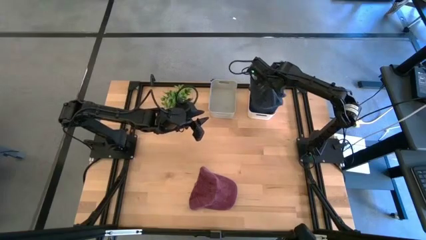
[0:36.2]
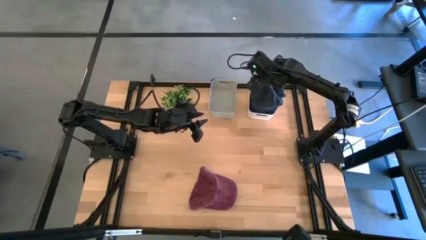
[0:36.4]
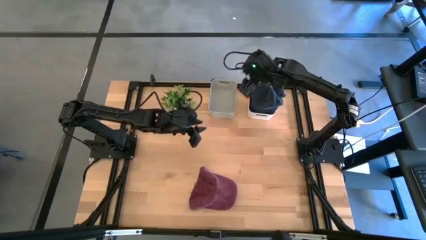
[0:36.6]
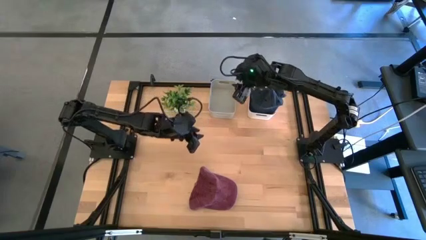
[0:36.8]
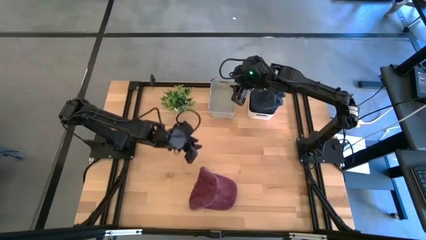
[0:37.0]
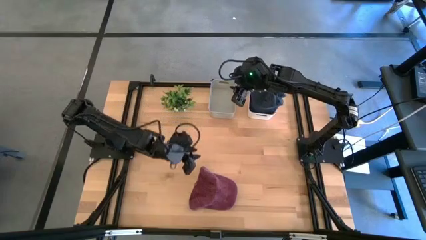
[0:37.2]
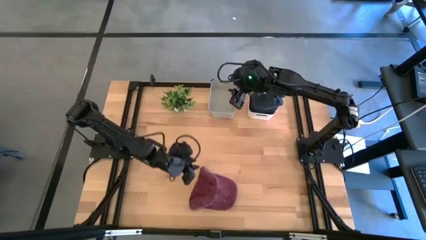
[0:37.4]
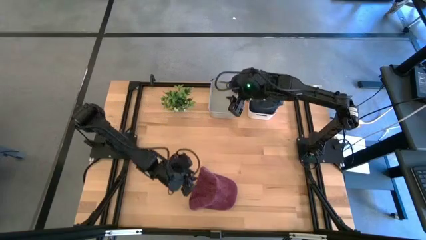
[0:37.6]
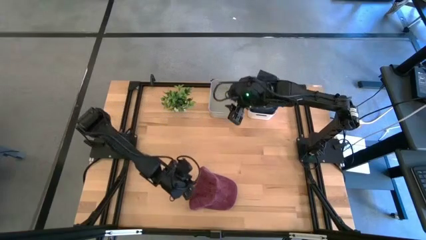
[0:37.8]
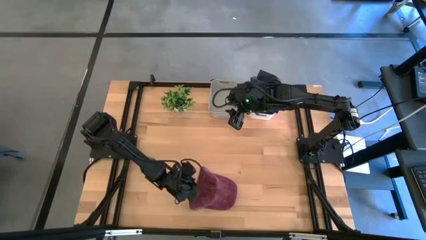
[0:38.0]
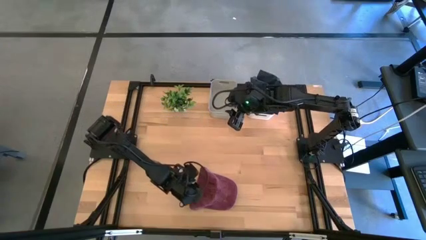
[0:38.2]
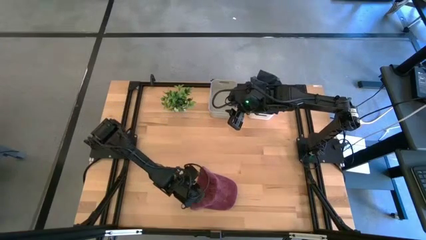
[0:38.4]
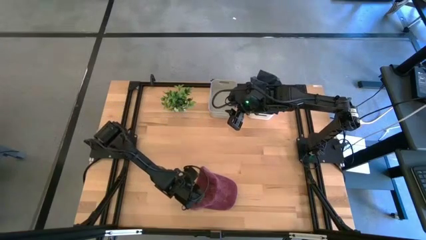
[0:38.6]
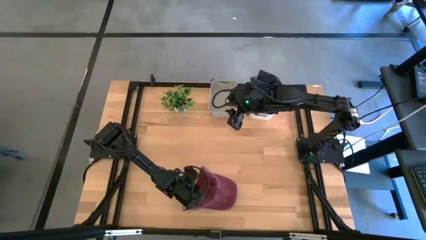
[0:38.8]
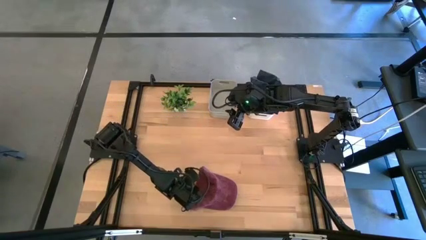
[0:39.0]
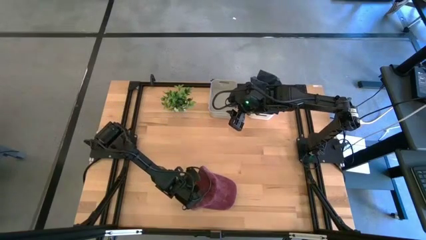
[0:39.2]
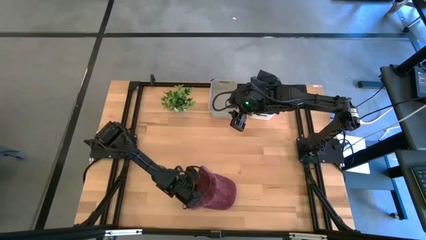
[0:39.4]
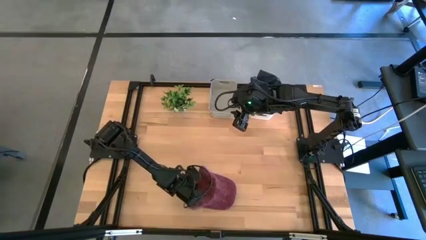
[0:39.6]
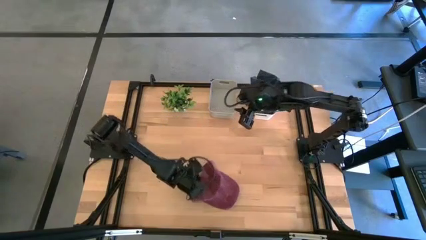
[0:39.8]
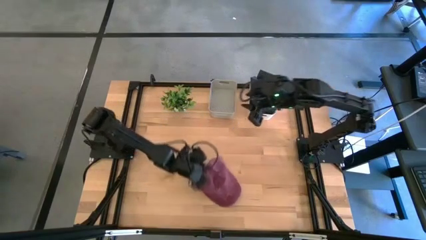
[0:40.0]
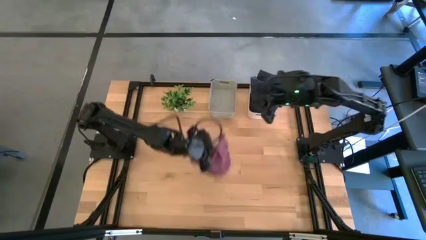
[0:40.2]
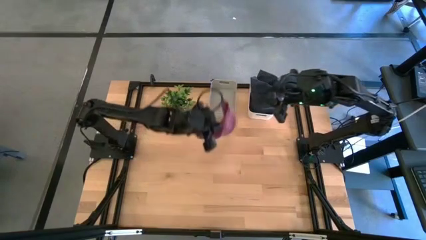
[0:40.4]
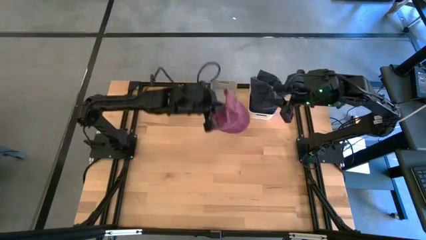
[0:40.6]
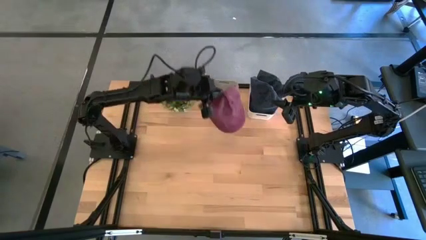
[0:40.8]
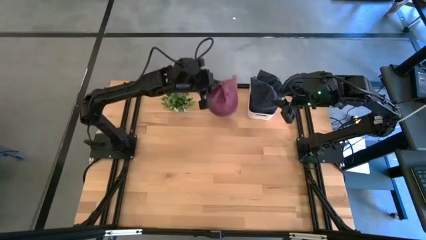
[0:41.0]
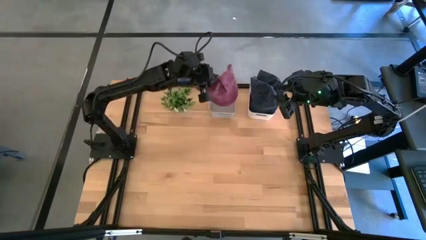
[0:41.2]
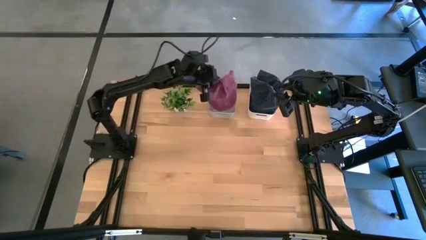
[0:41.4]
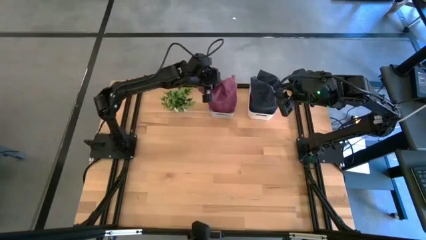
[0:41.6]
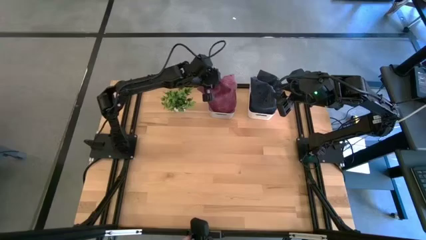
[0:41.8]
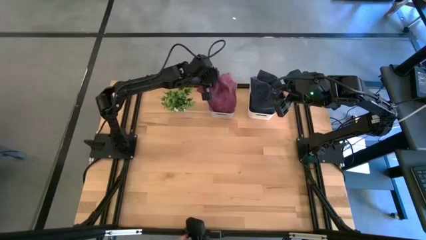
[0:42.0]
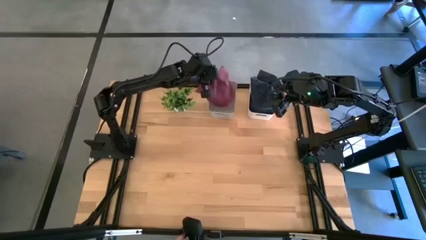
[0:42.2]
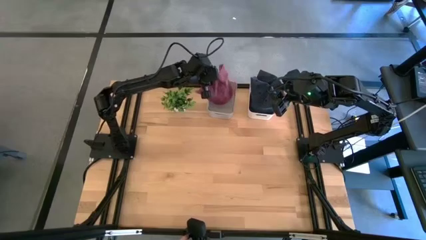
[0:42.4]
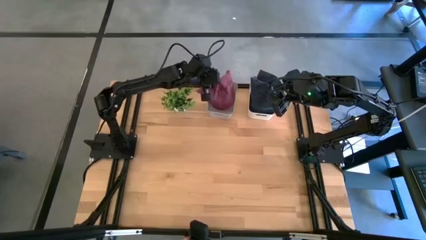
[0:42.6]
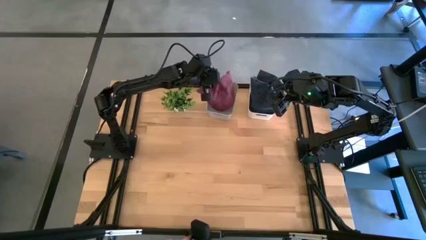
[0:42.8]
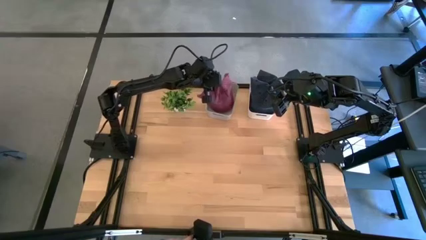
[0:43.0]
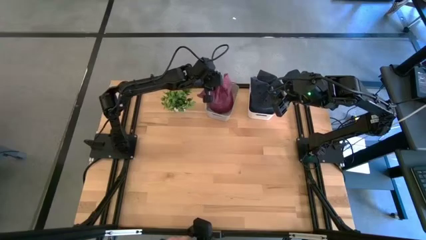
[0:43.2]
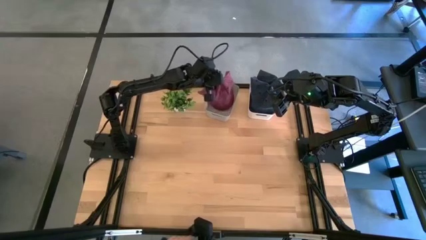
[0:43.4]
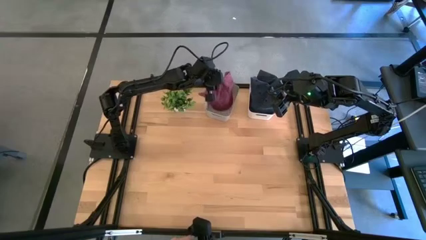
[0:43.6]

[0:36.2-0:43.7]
Task: Pick & Place hat
Put the red cap into the gray bin

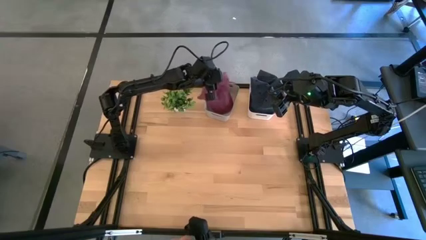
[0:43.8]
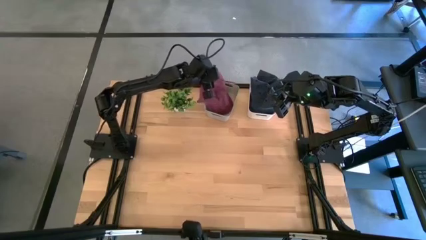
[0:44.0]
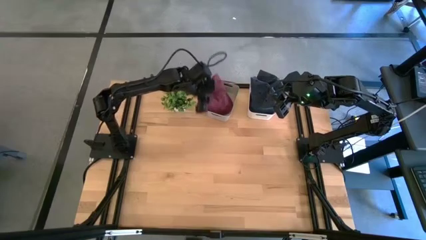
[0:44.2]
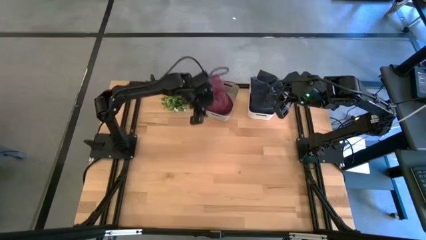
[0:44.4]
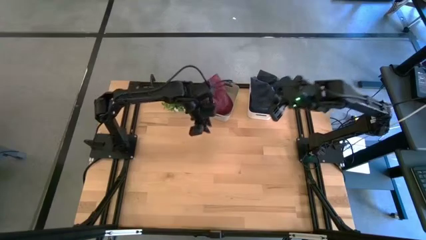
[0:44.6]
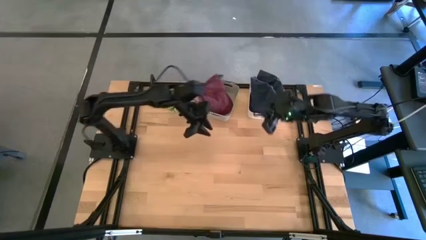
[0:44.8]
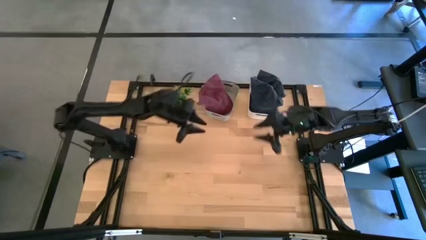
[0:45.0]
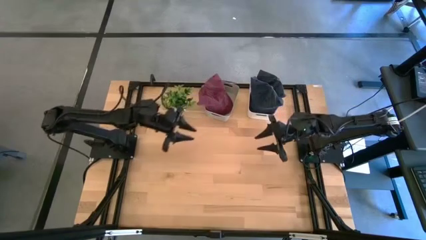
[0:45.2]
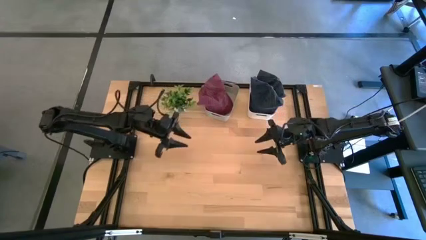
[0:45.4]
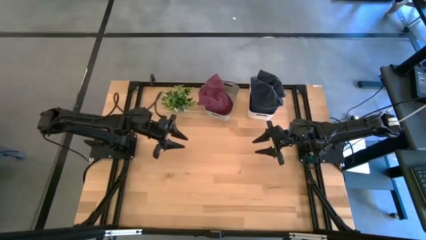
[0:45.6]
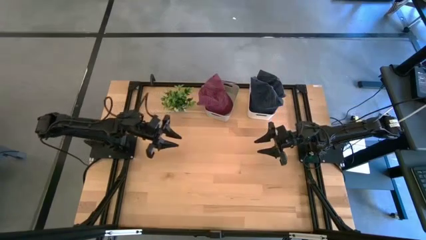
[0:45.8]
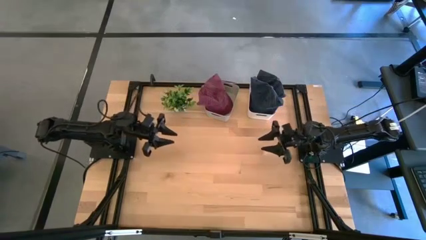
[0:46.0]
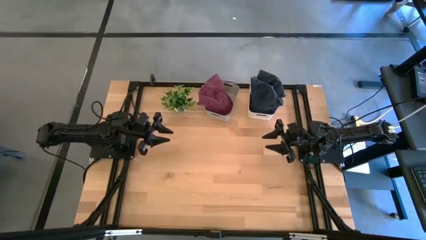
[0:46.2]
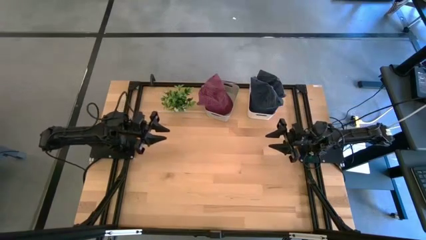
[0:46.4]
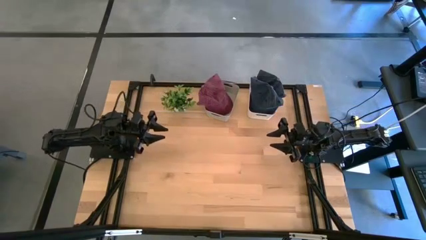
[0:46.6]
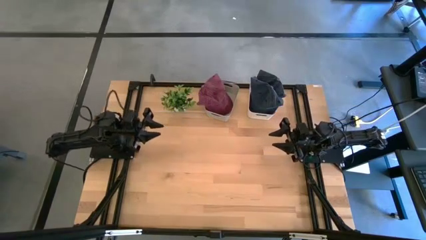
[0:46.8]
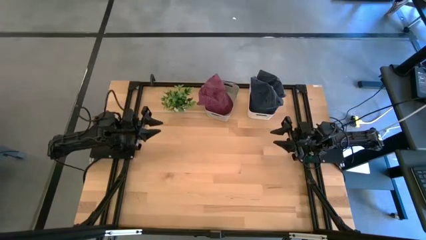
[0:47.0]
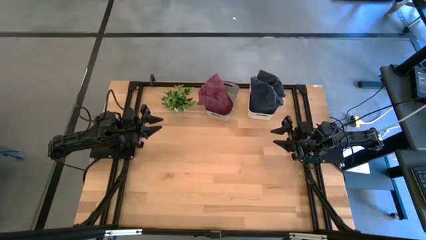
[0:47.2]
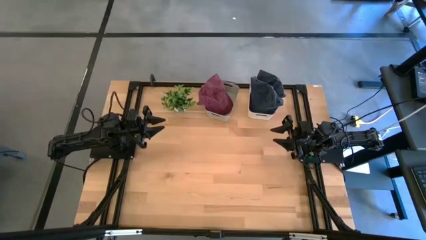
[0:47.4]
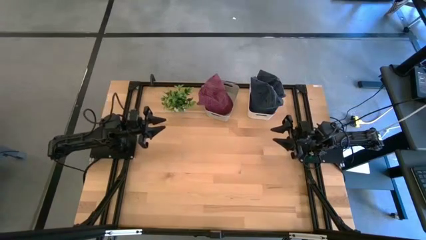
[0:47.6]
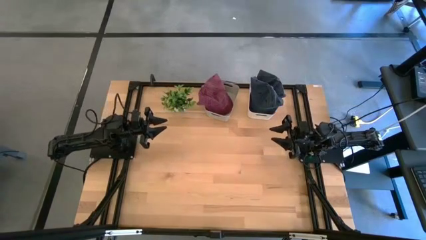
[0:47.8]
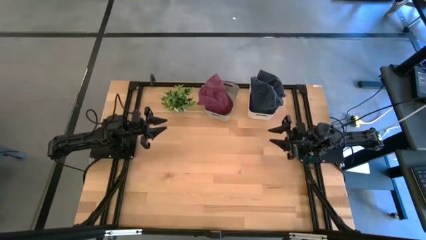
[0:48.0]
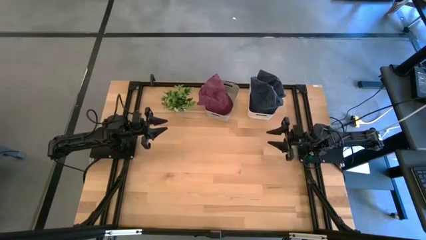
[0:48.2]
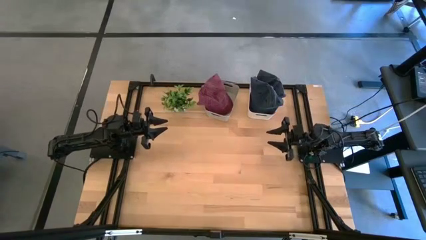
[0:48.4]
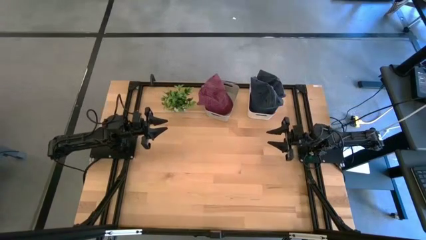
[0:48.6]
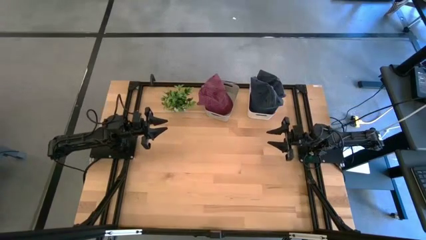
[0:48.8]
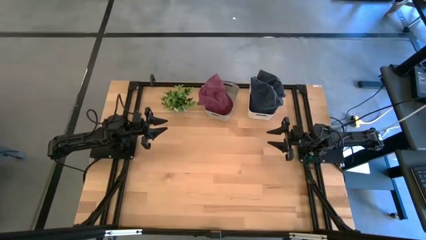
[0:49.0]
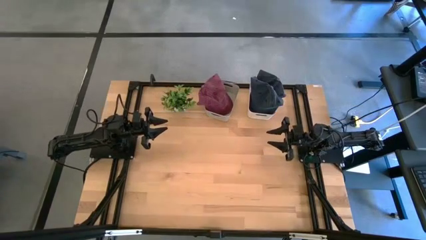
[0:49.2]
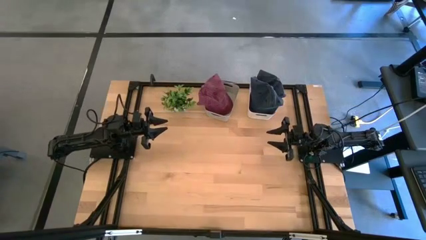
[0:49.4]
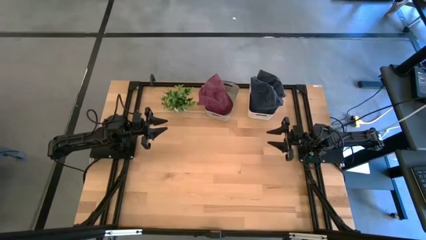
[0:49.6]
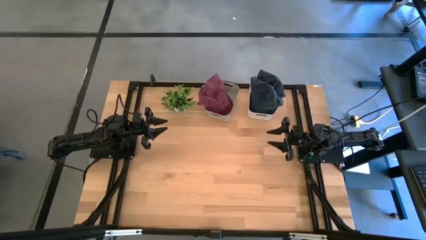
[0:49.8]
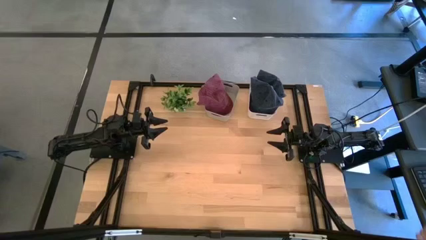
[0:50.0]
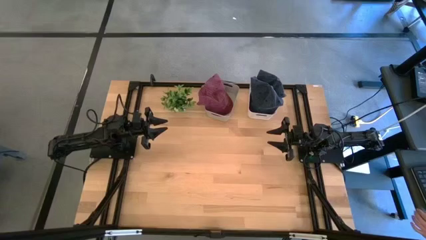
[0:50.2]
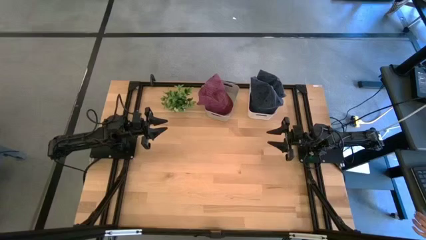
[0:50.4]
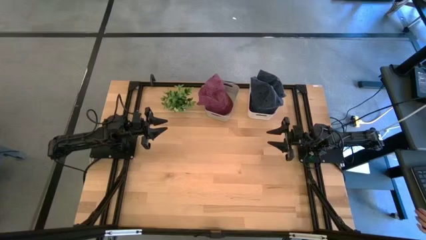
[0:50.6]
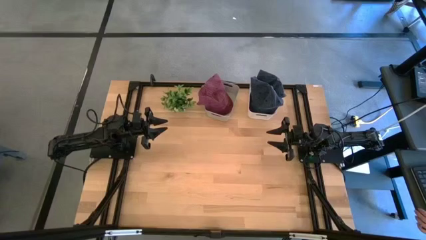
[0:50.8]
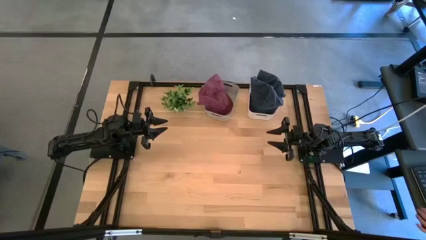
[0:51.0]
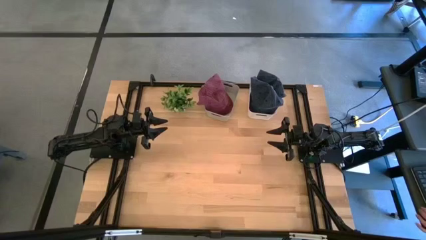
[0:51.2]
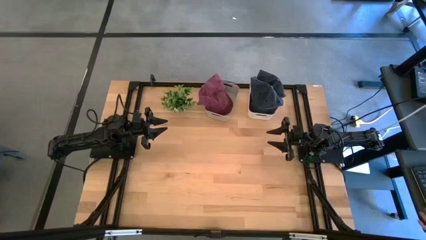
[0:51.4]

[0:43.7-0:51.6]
Return to Home Position
